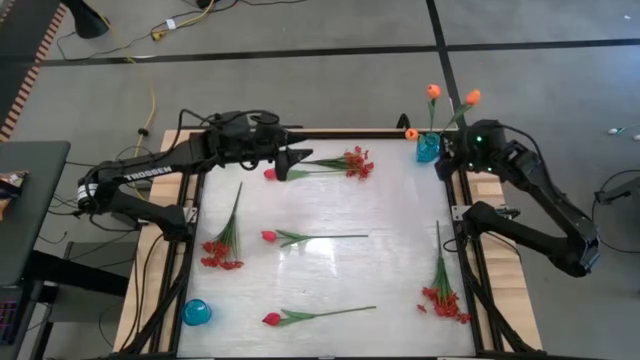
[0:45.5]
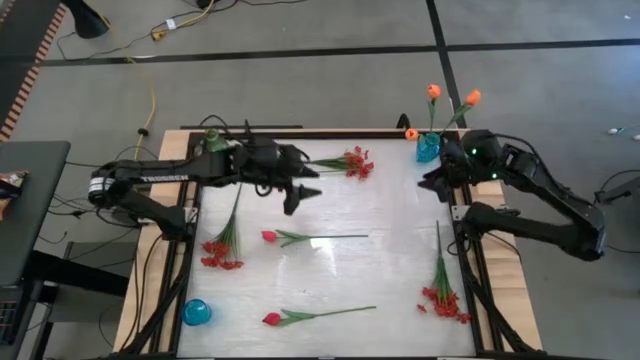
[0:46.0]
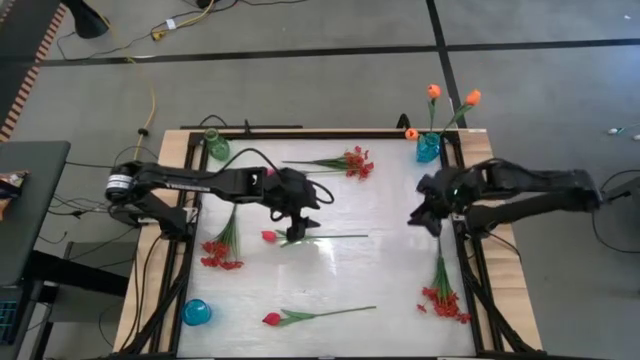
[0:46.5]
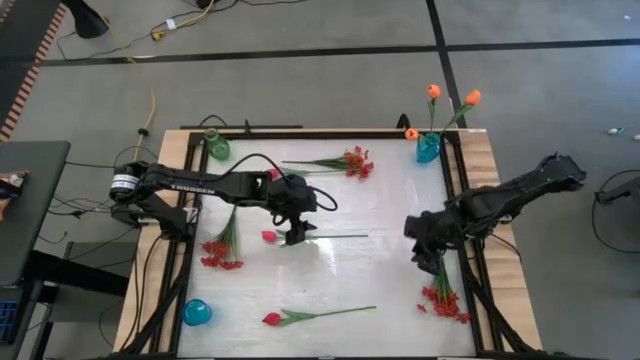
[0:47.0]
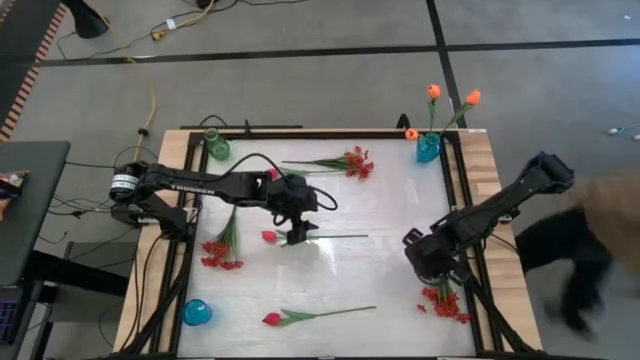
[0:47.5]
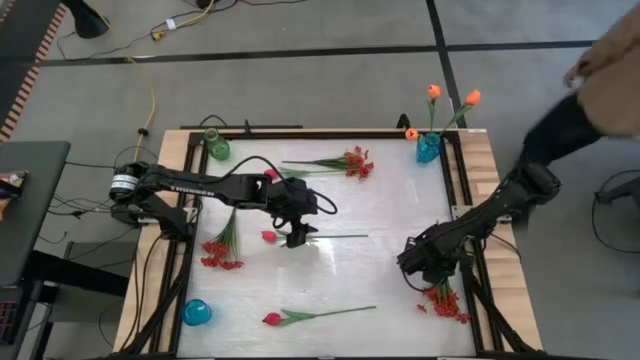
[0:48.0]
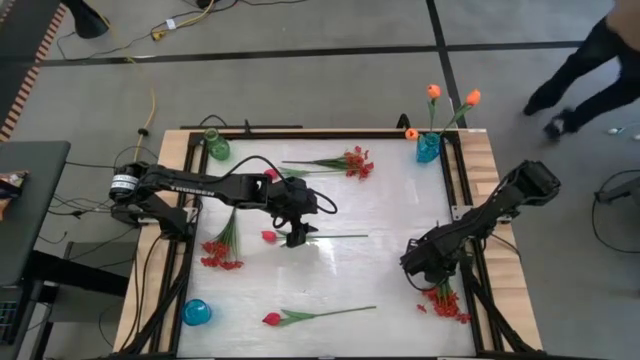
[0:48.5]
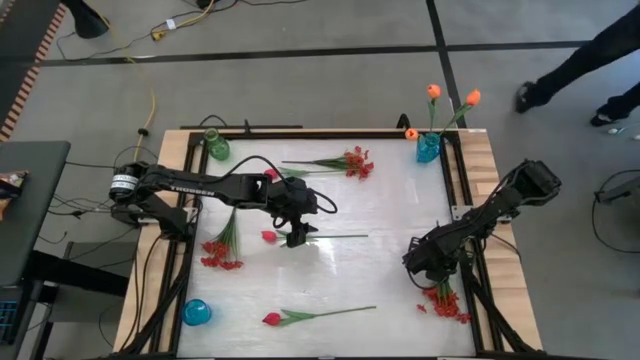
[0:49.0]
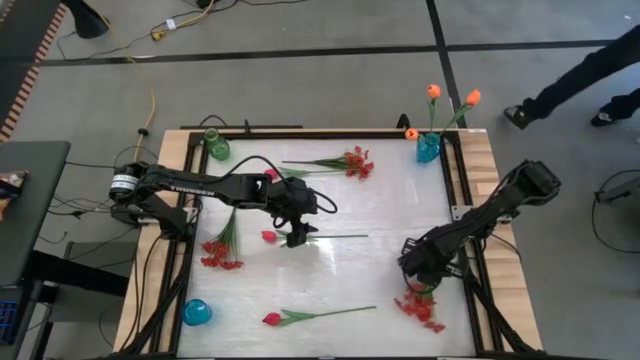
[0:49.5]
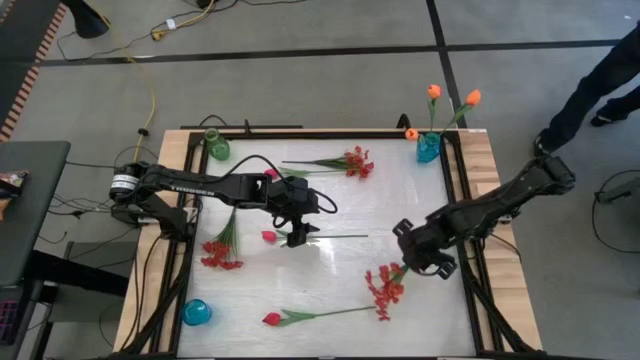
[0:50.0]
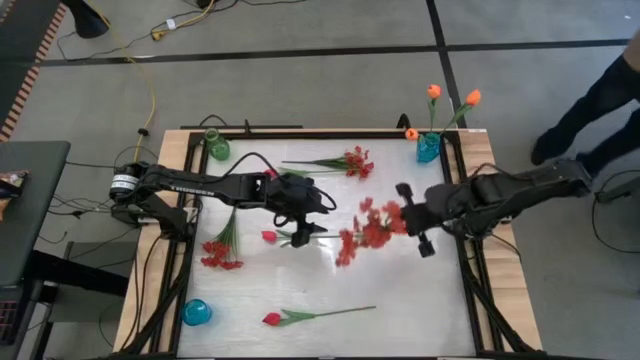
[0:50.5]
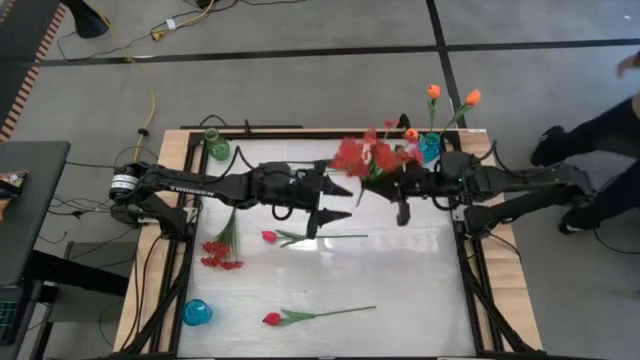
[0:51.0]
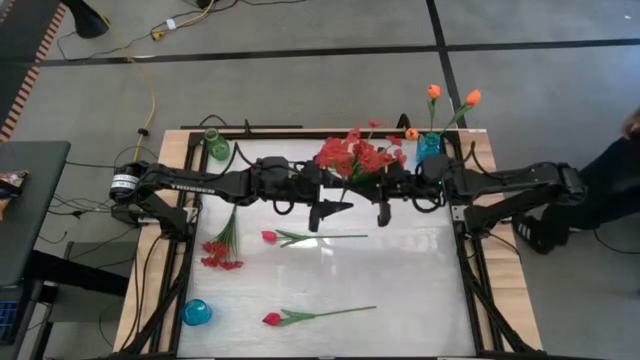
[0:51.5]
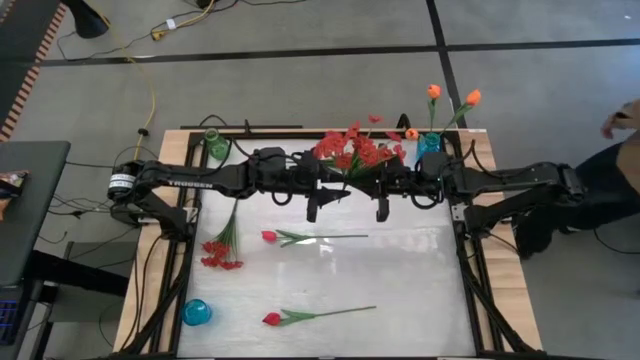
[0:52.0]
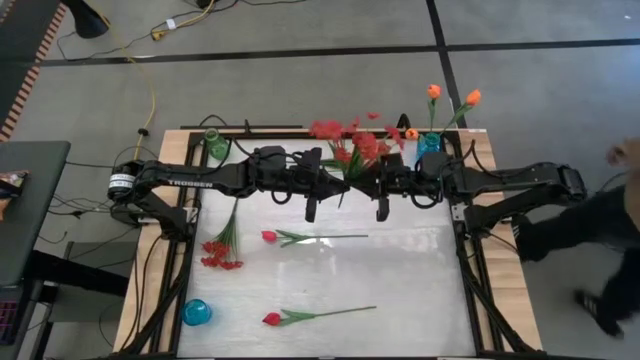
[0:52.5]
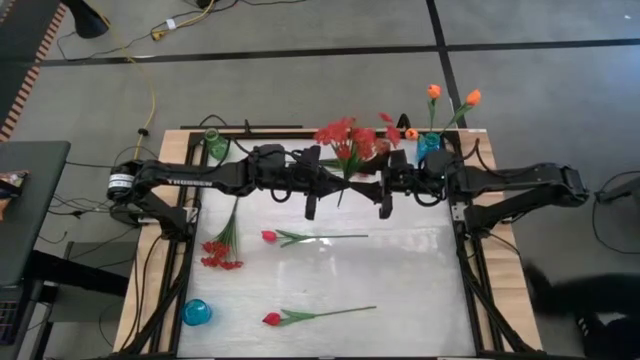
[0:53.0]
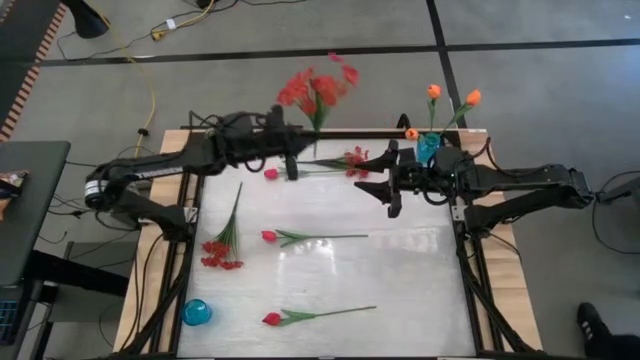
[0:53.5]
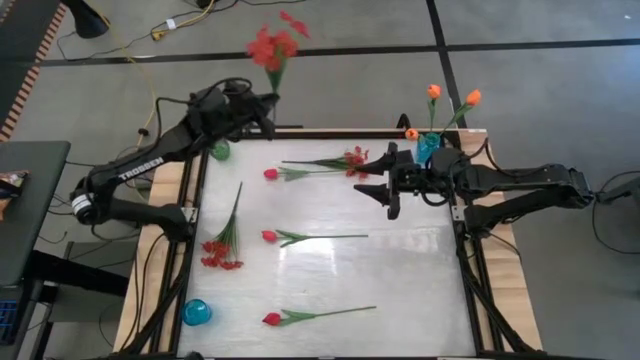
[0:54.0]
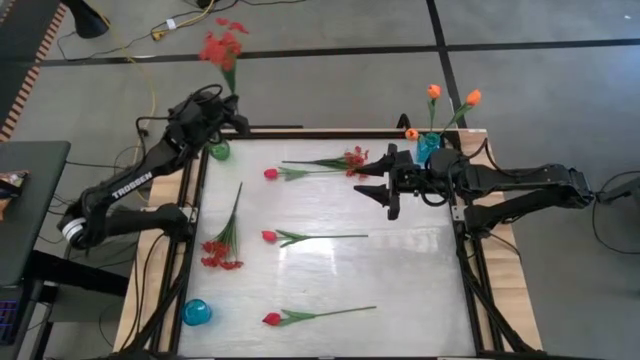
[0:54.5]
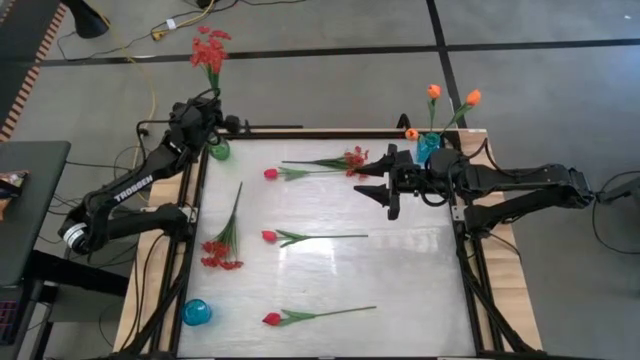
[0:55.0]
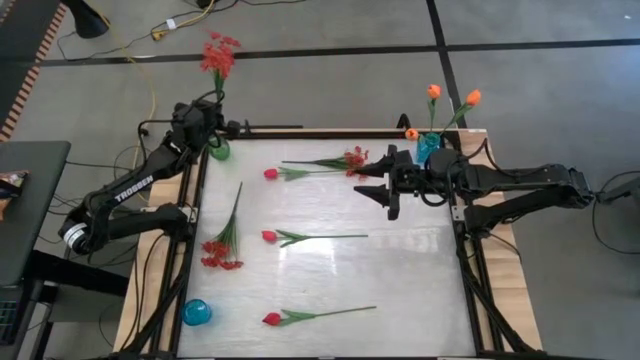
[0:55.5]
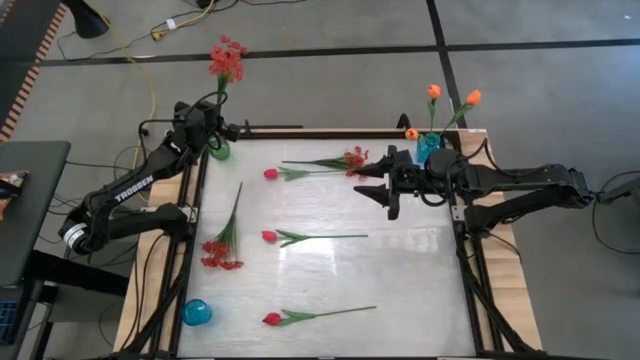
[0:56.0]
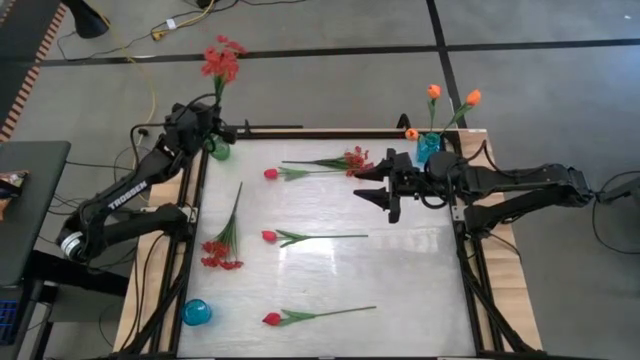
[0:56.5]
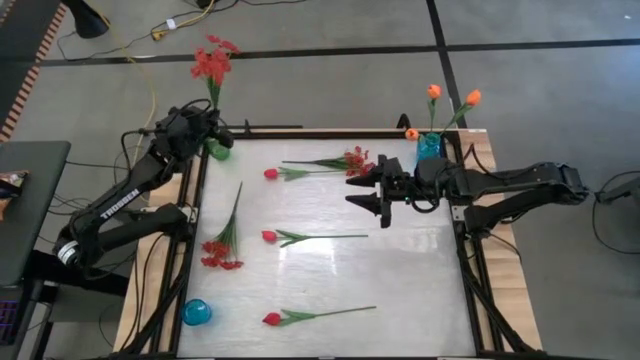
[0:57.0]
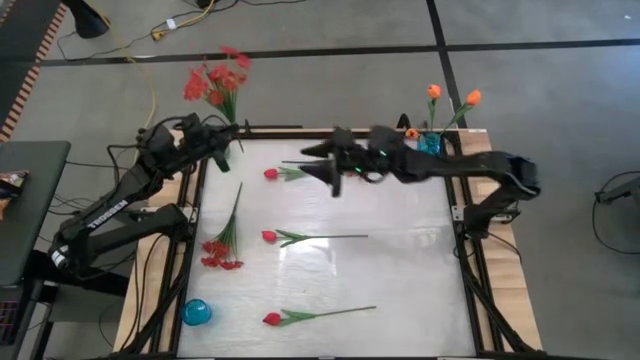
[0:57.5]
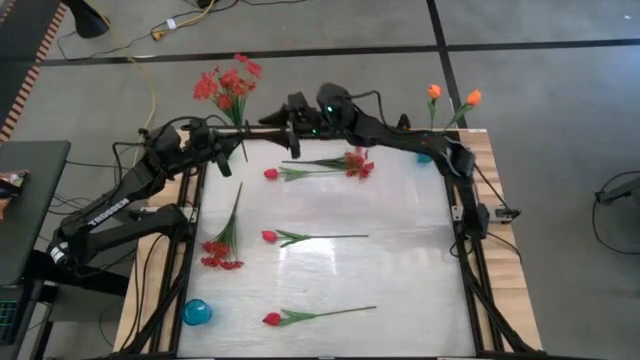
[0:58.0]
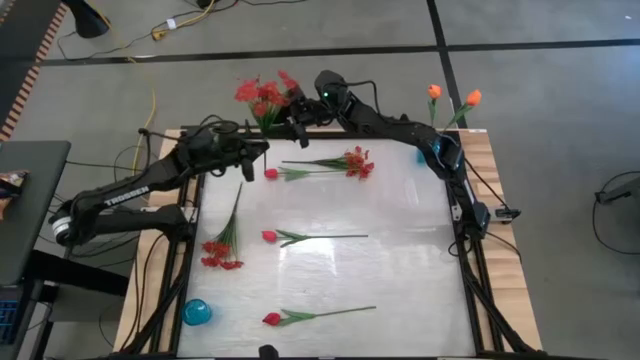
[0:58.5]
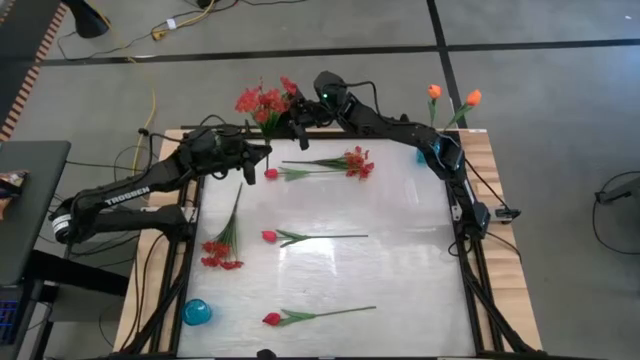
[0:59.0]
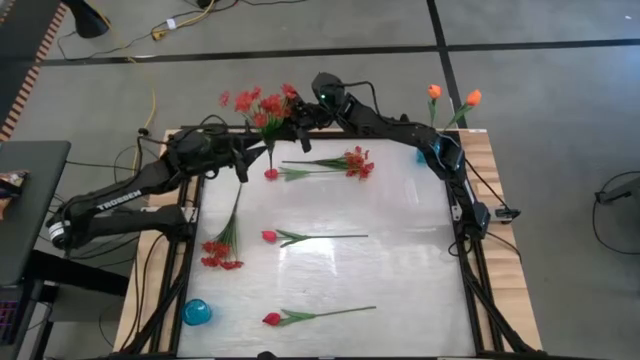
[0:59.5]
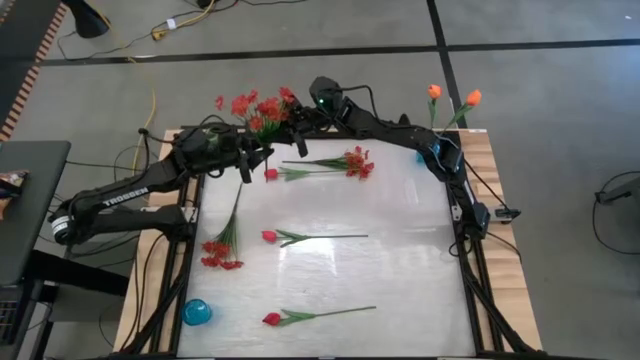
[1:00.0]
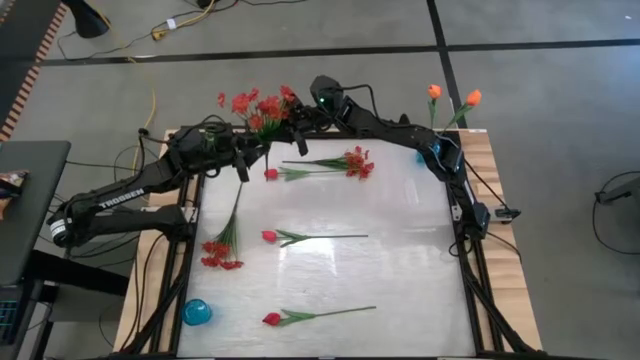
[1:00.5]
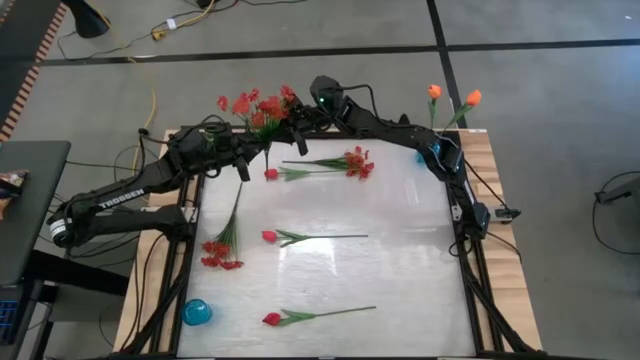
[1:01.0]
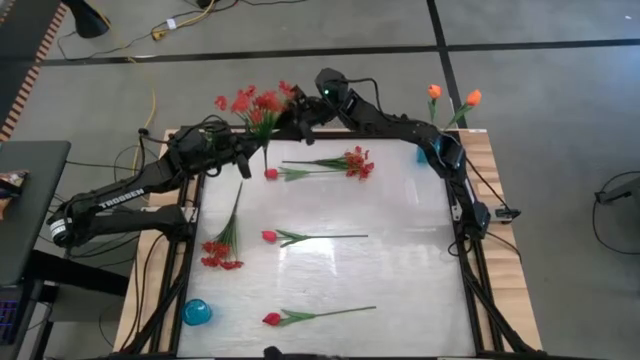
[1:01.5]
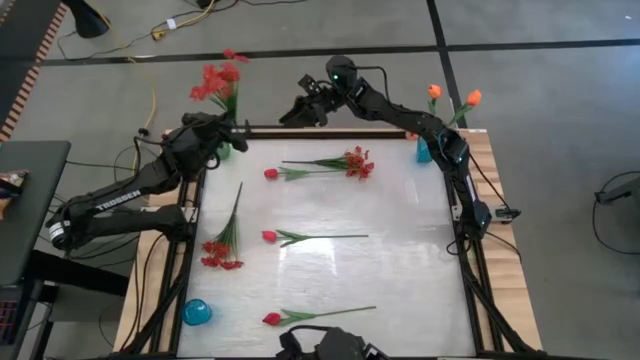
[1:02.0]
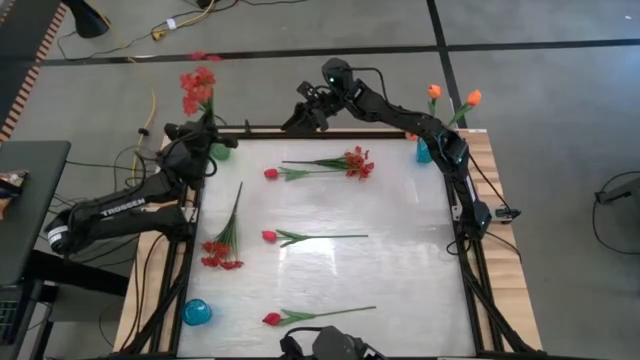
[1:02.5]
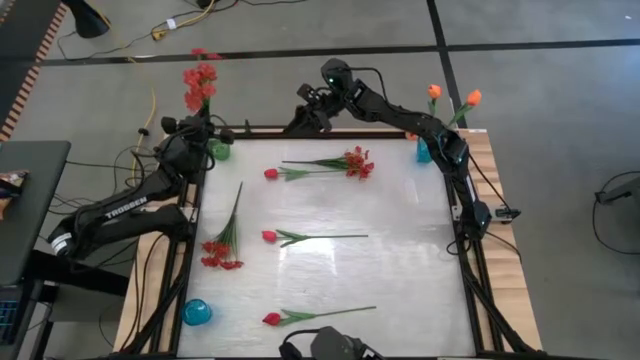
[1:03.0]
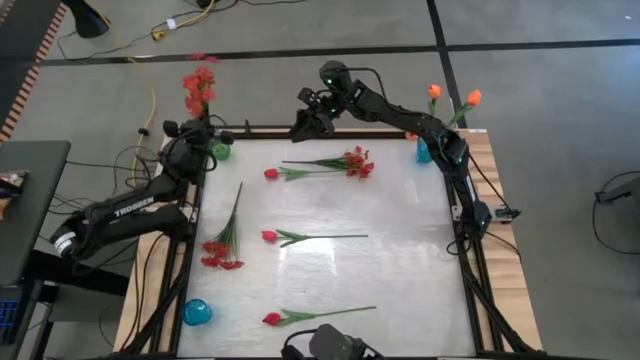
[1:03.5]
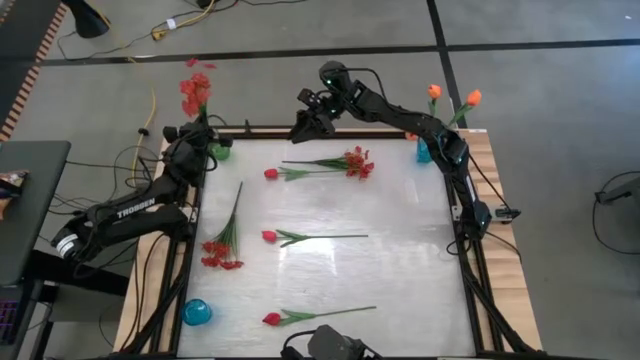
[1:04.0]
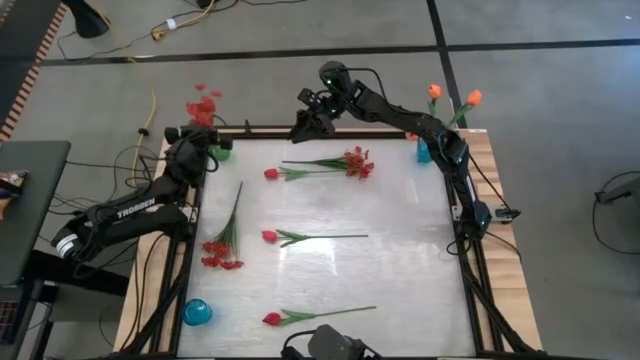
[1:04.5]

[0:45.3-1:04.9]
Task: Sort flowers into vase by color
Put the right red flowers into the green vase

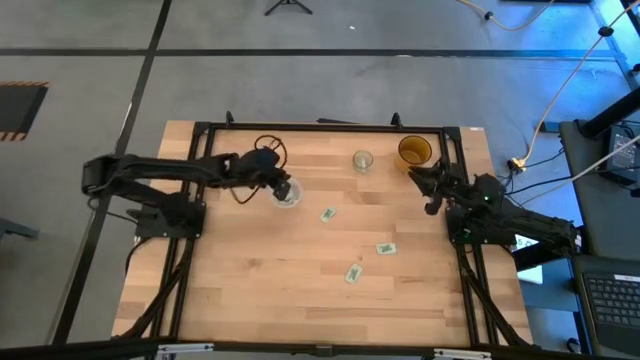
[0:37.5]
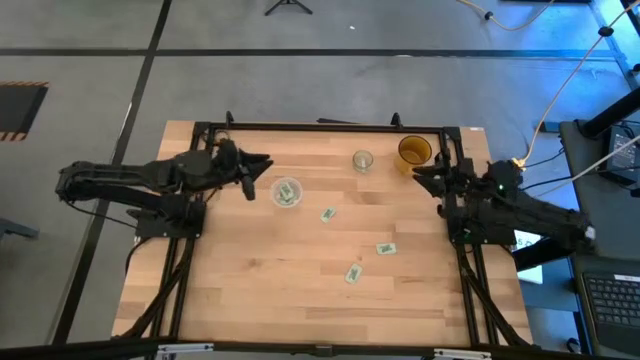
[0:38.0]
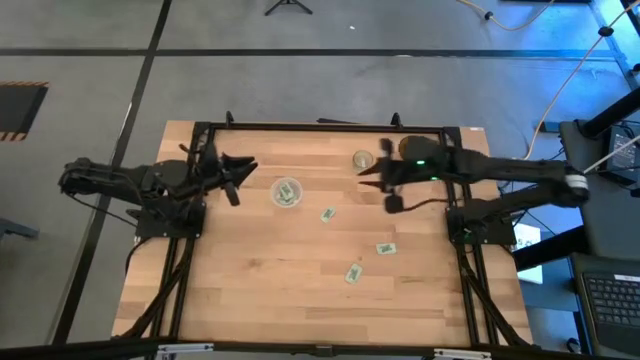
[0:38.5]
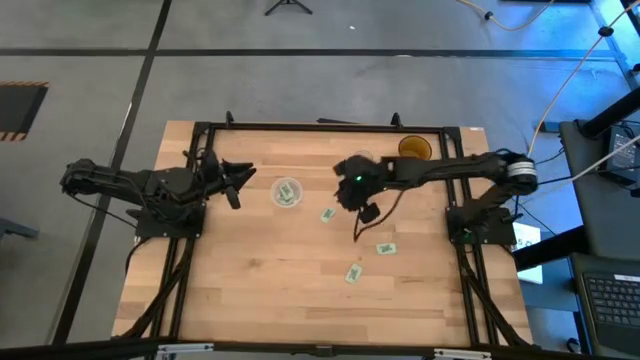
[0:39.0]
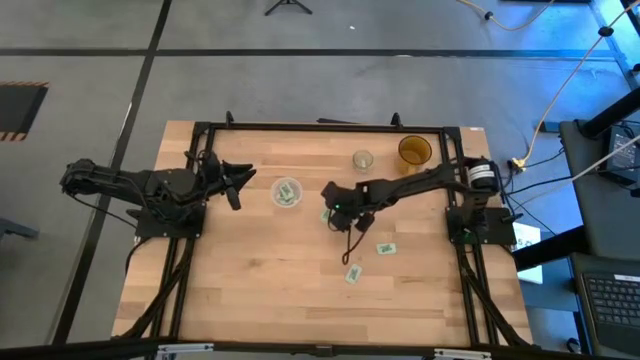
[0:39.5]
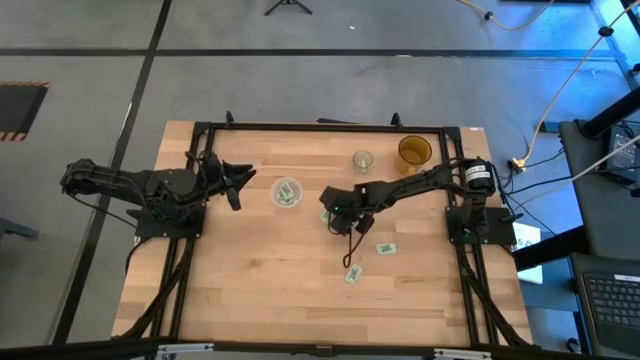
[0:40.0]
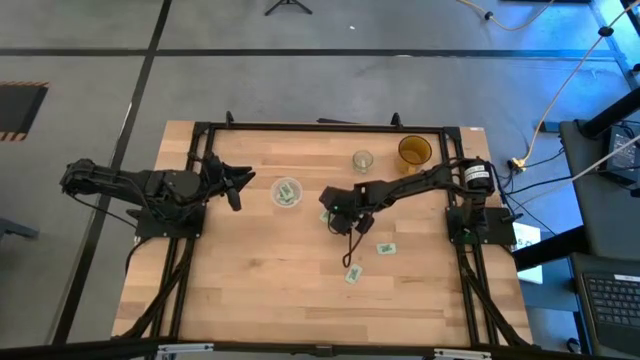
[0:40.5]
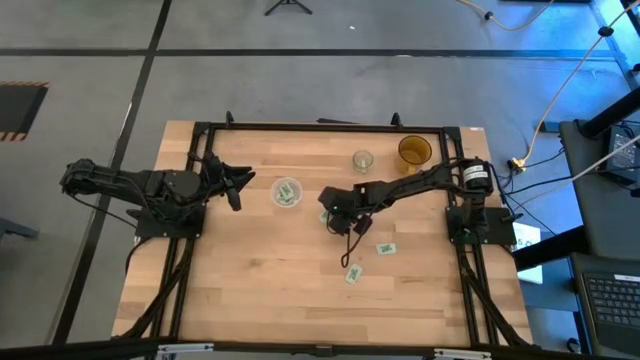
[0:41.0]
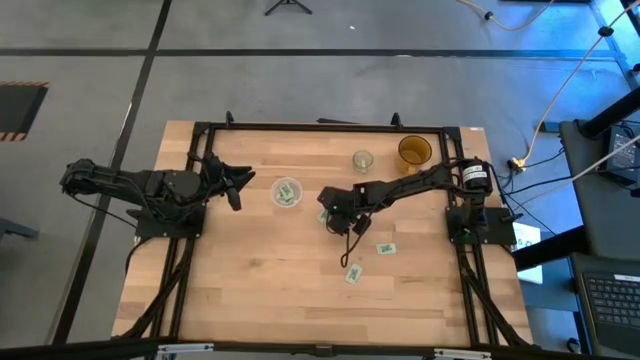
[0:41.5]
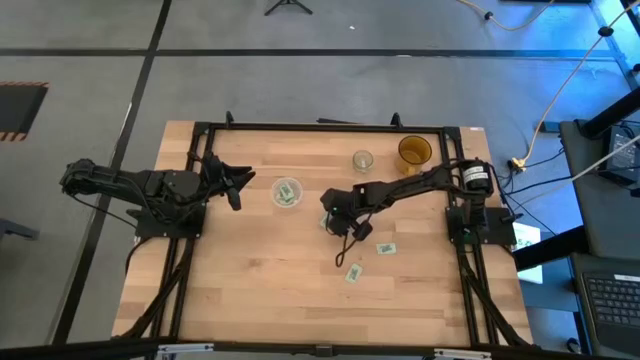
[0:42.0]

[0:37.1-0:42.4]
Task: Pick and place Stevia / Truvia into bins
Put the stevia packet into the transparent container
